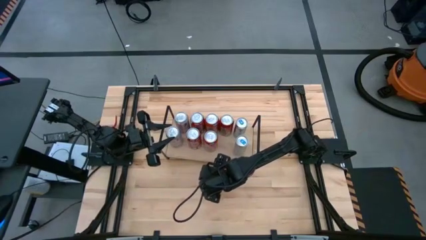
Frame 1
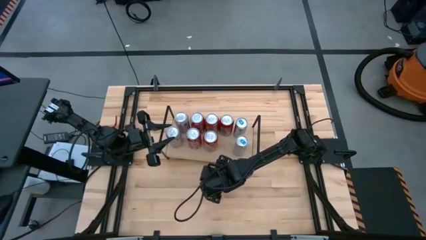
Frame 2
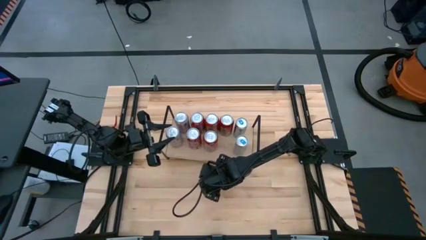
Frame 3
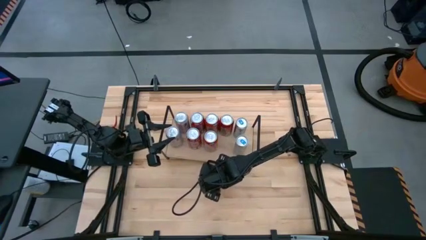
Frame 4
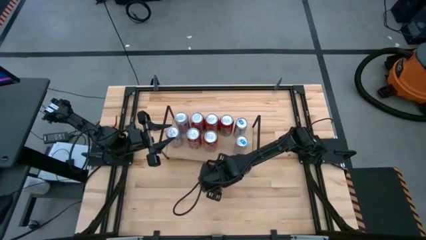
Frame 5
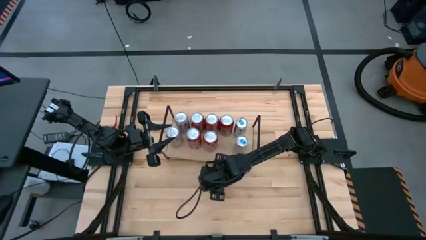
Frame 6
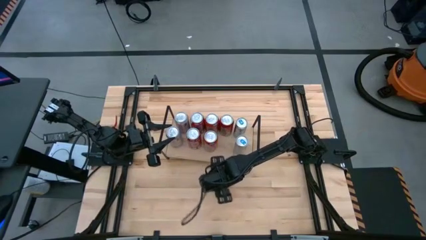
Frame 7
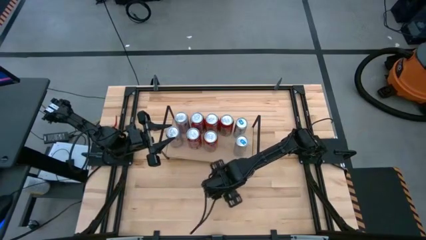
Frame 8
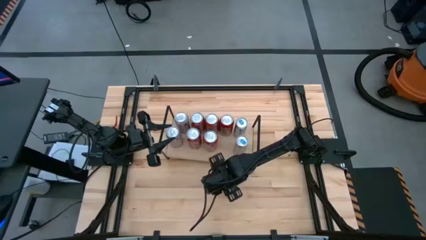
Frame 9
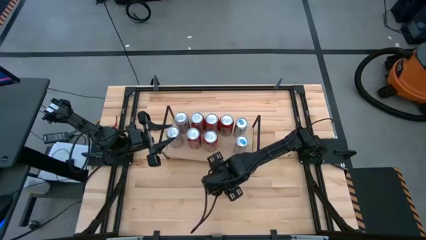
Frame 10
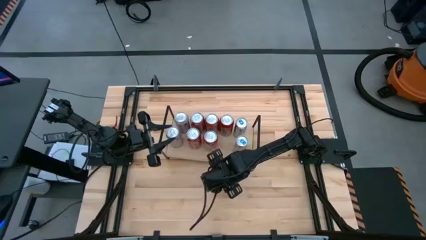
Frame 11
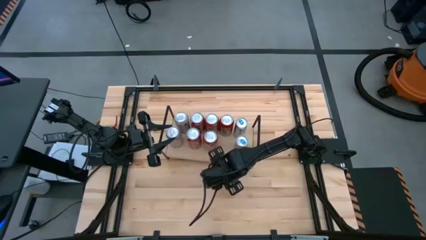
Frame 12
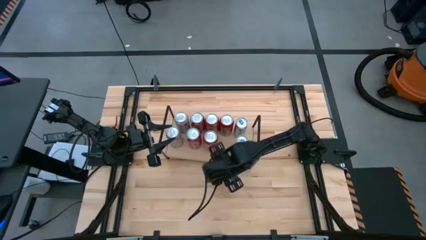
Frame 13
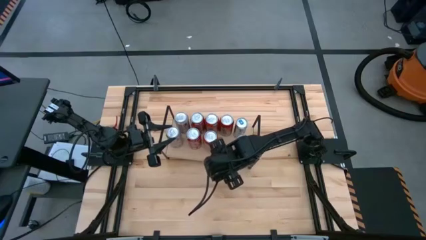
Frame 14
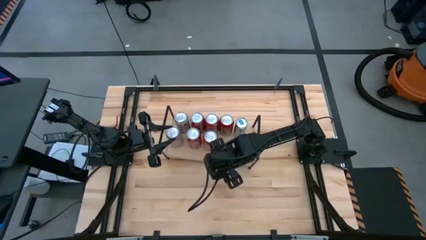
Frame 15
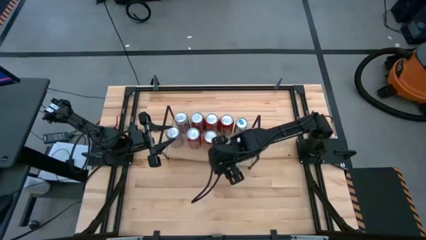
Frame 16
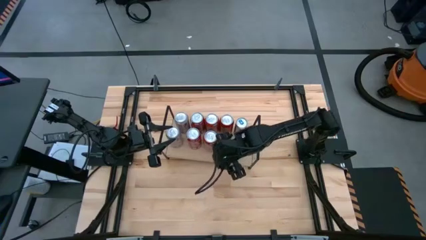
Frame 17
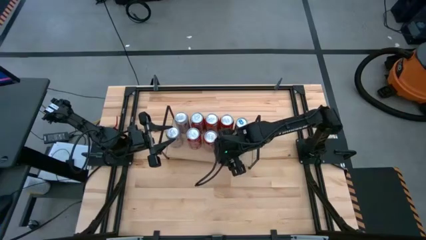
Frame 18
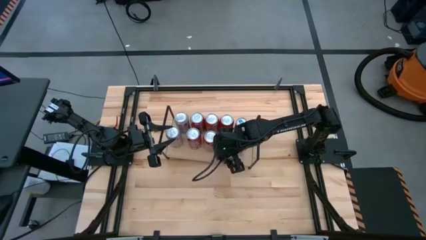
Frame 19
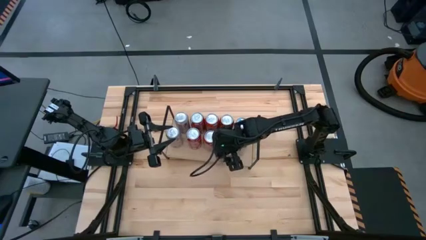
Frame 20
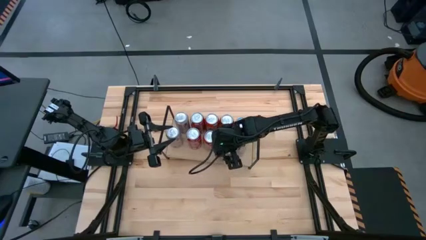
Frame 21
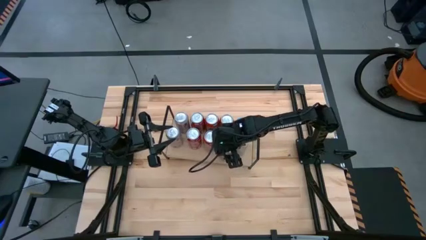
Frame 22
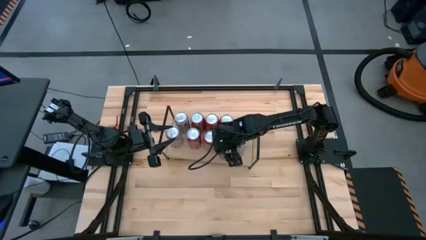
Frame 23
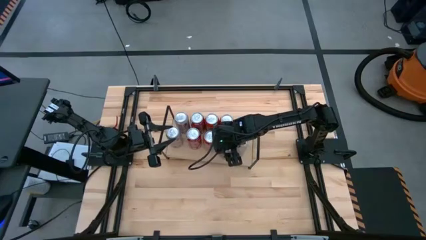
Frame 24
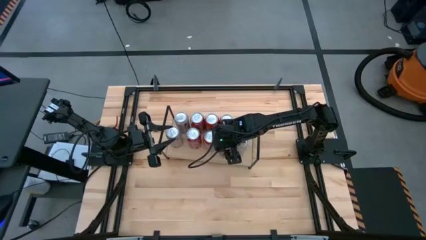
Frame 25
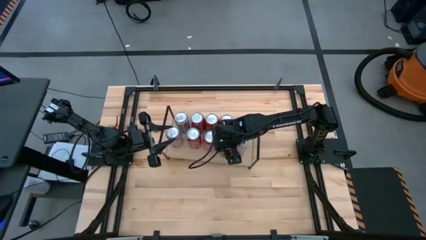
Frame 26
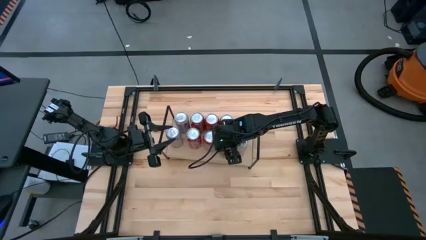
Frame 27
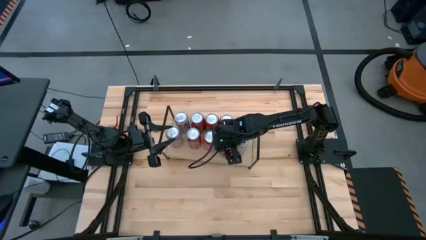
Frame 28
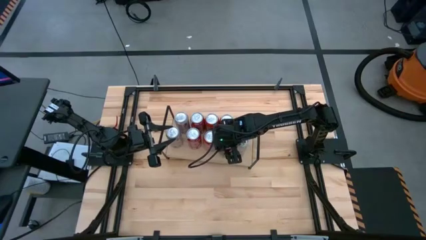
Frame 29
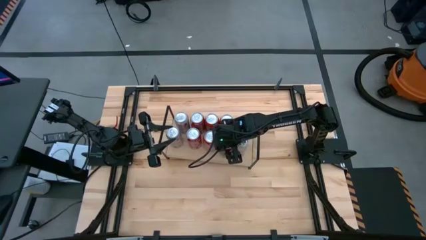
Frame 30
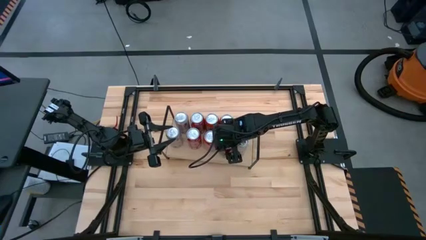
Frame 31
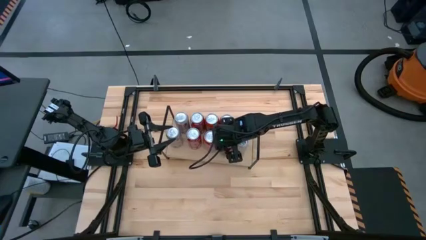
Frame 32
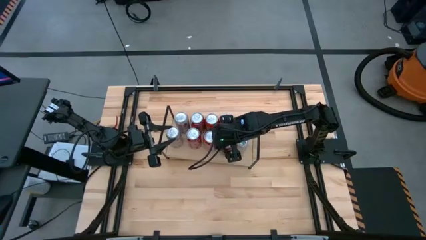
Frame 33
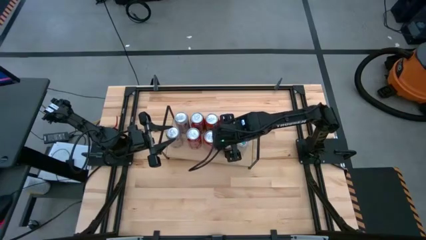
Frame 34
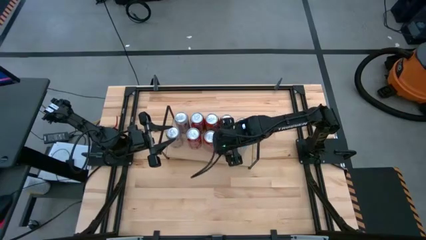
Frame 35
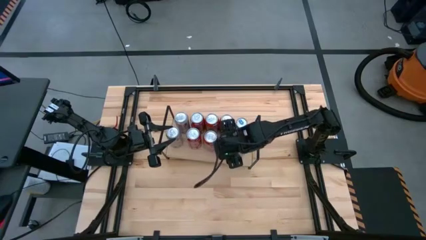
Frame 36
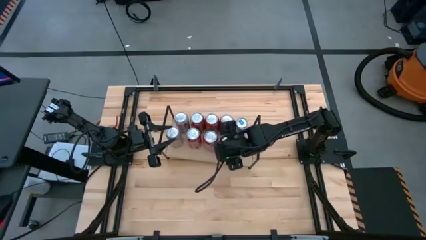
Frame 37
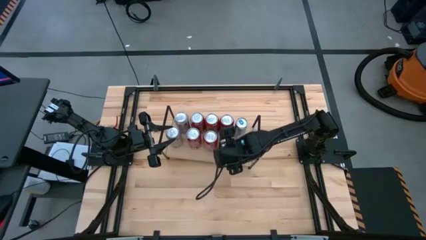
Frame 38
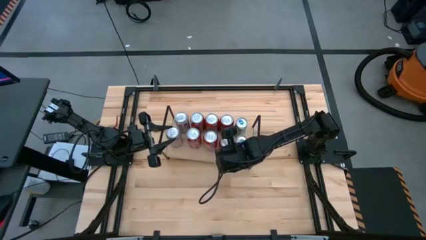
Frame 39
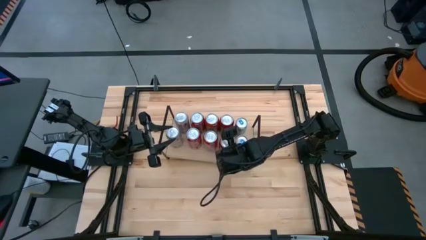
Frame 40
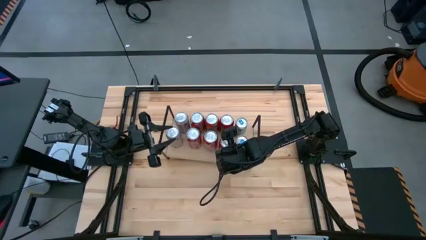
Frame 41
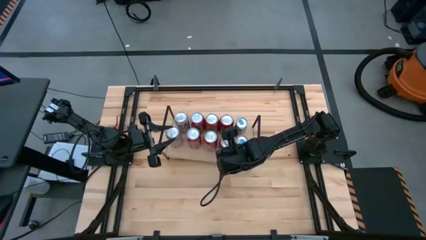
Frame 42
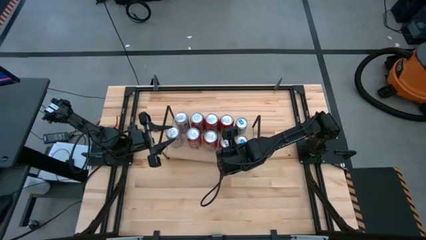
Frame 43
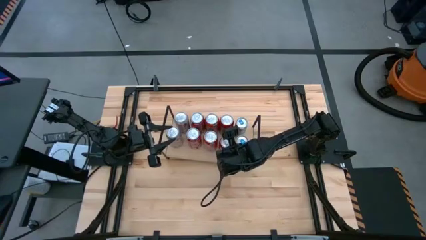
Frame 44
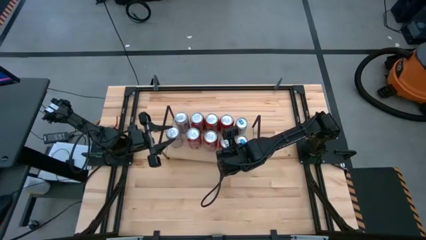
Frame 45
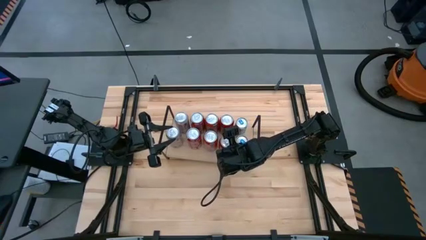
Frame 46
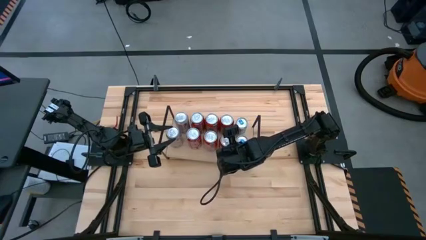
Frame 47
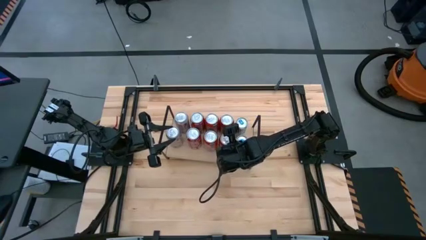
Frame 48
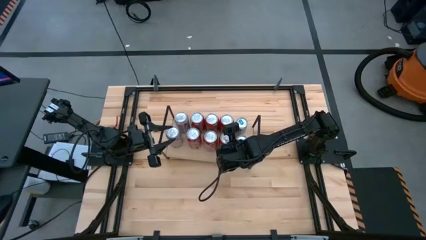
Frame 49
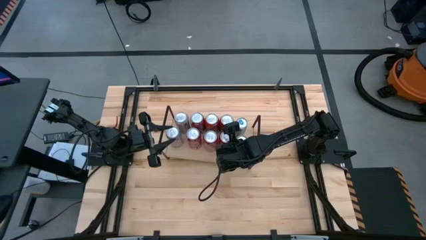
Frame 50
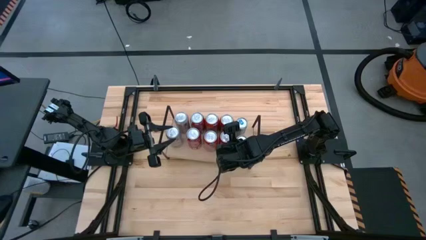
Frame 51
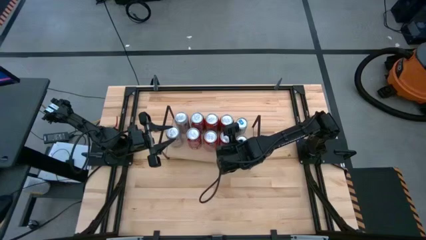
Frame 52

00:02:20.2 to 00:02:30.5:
Task: Place canned beverage on shelf
Put the red-black soda can on the shelf aligned with the other red-black soda can

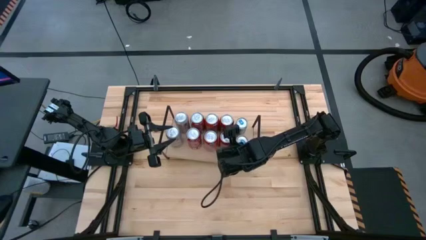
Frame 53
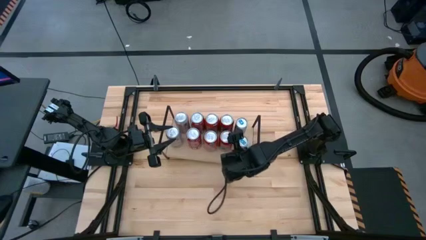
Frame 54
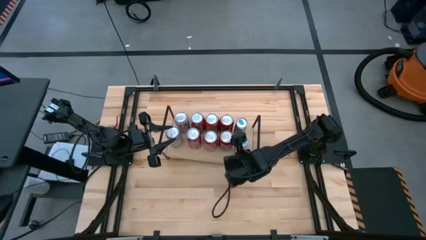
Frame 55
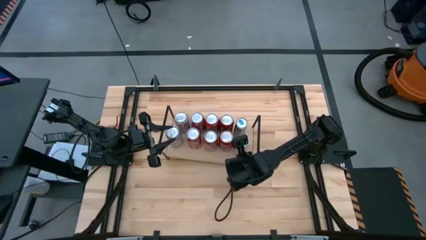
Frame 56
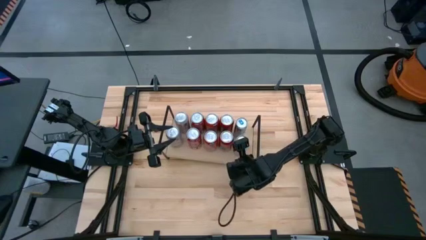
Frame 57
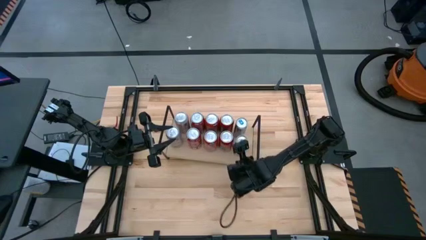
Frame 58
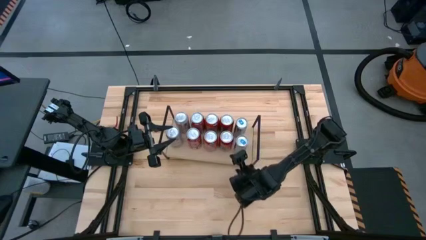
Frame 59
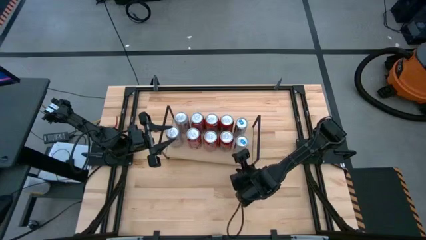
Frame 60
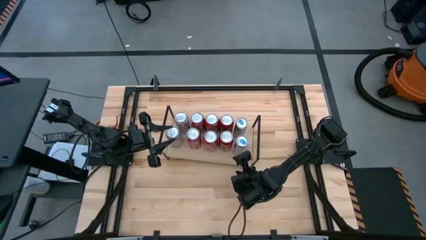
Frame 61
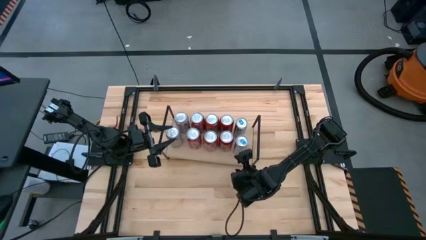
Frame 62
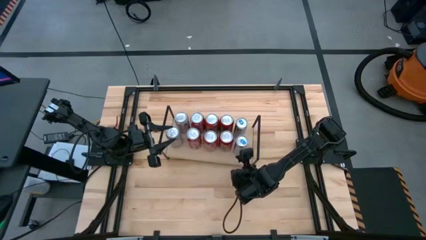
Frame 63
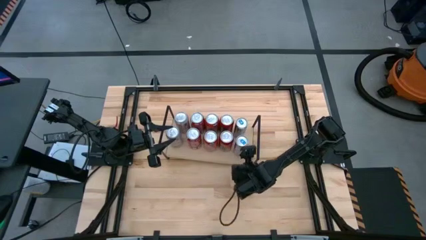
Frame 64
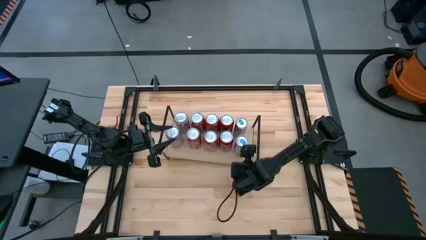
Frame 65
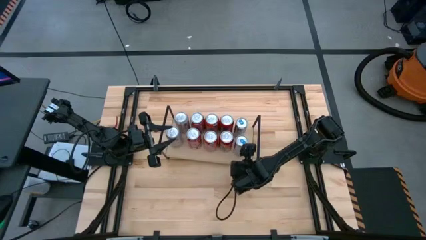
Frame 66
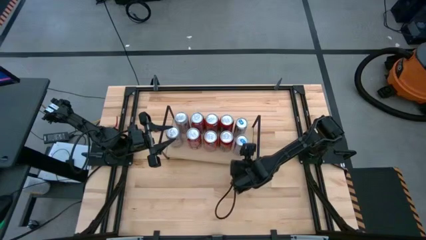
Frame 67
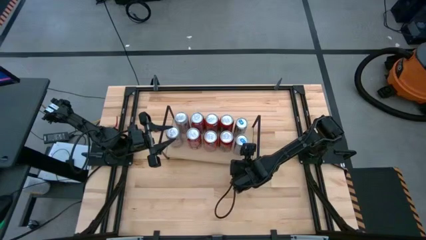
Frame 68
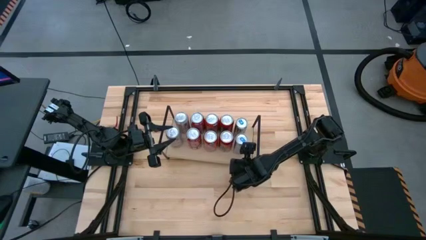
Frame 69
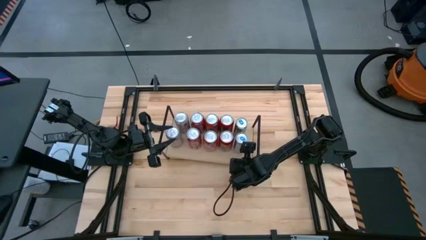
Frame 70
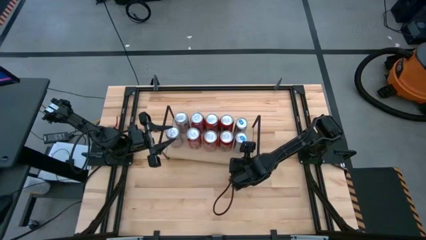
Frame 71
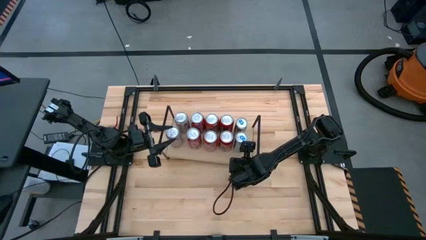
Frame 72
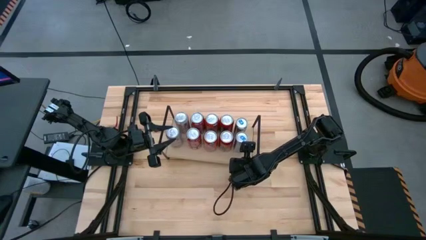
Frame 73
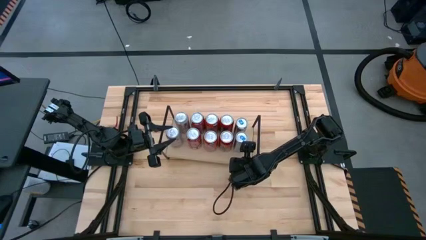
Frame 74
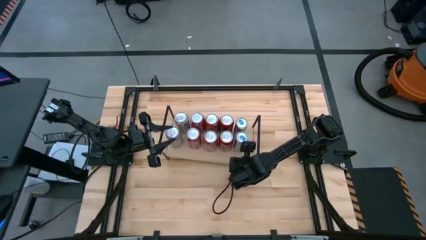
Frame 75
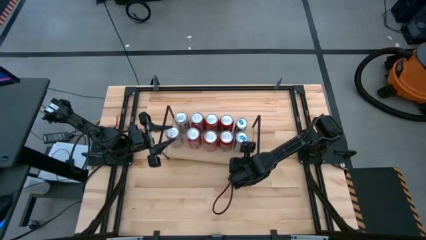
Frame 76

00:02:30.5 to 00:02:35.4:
Adjust the bottom blue soda can on the shelf

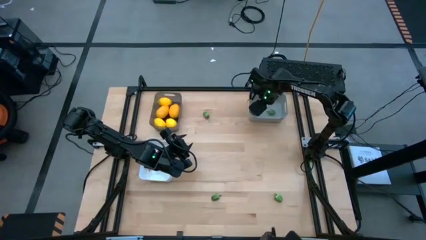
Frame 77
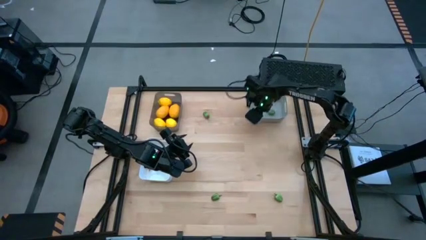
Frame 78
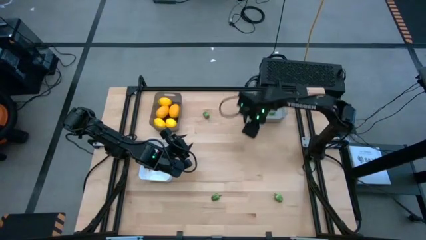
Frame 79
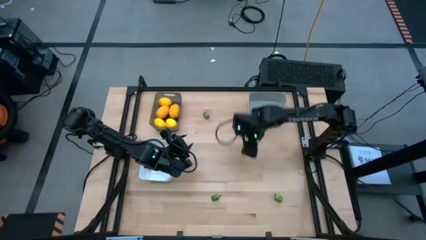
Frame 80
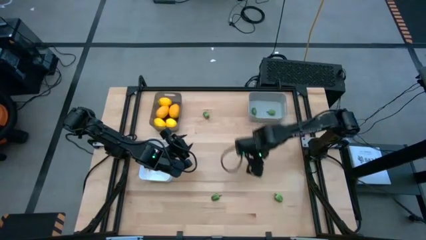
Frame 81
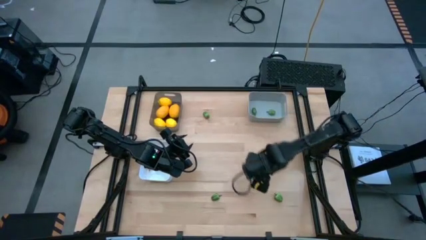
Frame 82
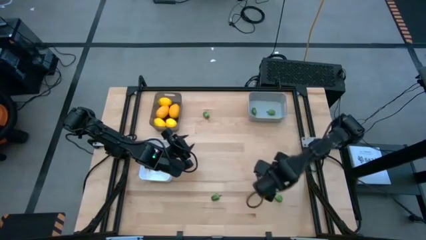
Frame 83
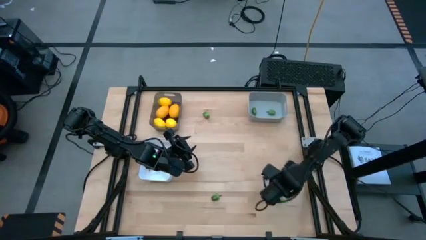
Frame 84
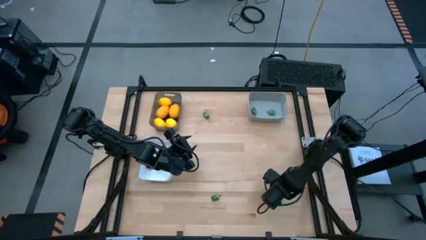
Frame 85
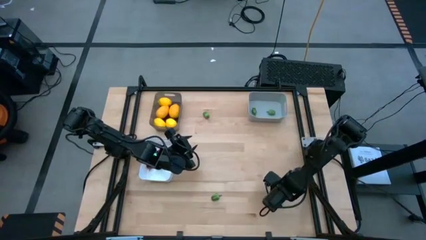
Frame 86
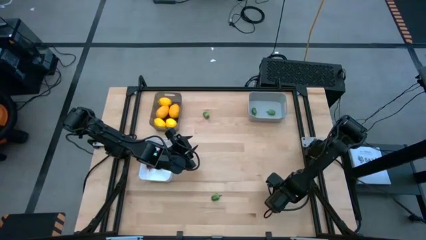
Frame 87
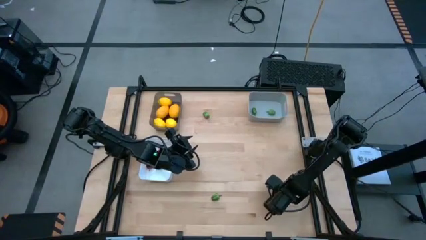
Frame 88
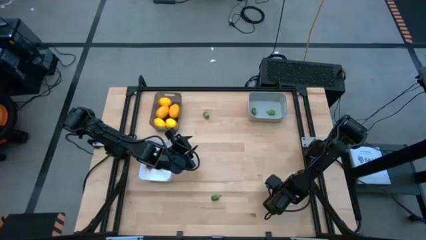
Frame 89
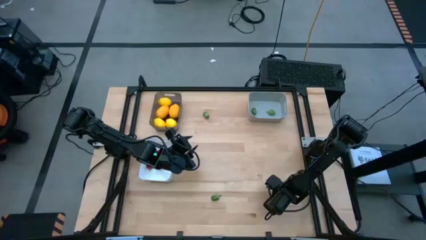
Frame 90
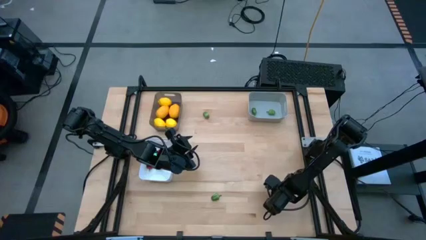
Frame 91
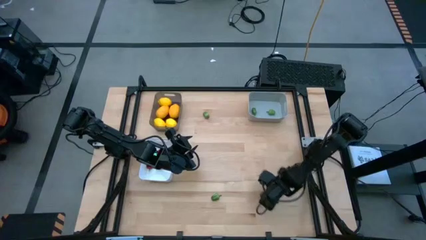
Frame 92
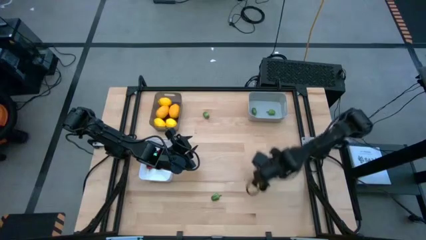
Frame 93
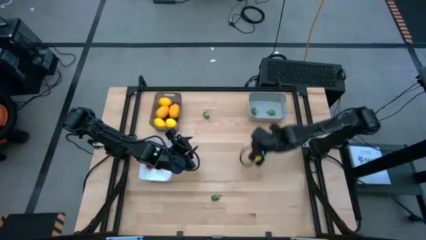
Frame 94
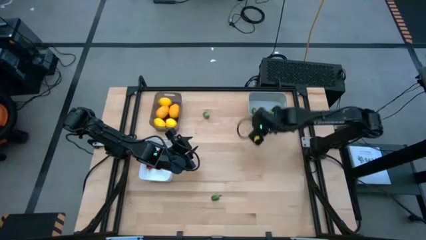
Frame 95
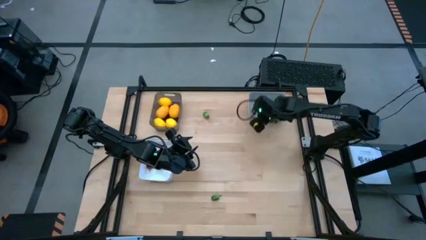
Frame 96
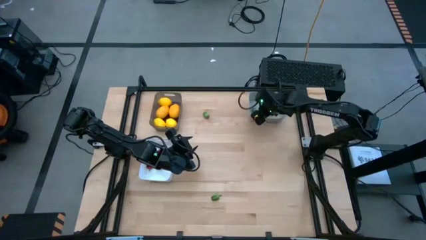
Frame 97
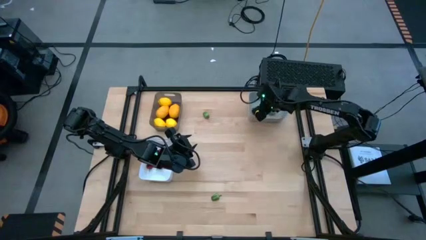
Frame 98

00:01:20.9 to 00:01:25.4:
Task: Sort produce into baskets
Put the bottom right green chili pepper into the gray bin
